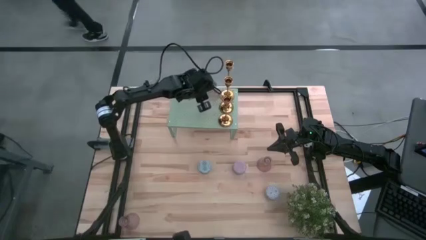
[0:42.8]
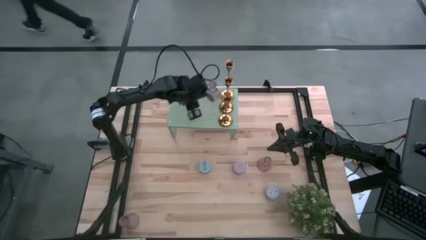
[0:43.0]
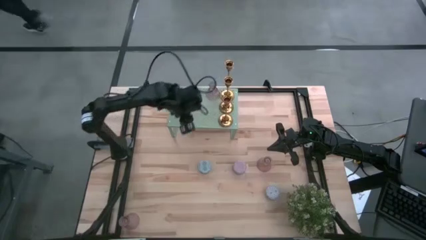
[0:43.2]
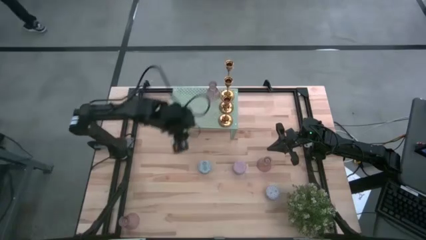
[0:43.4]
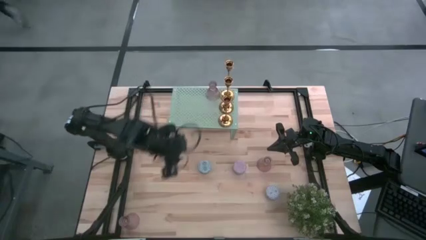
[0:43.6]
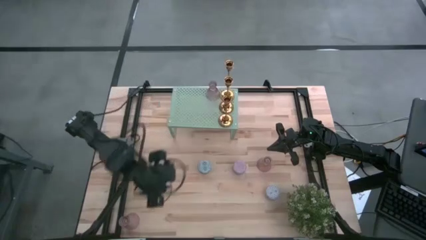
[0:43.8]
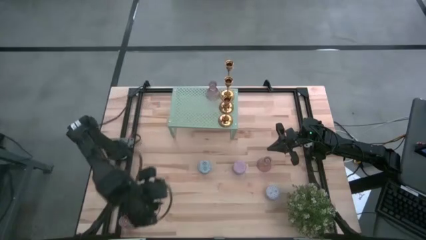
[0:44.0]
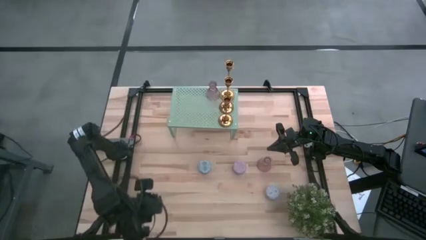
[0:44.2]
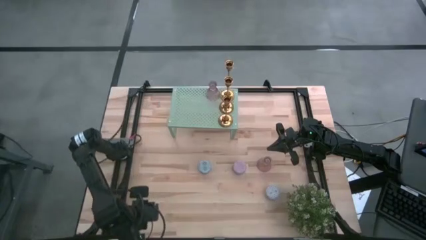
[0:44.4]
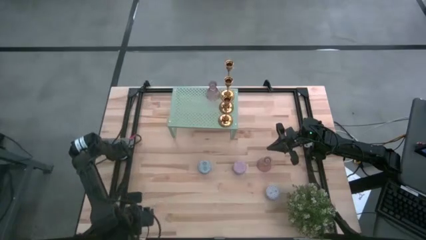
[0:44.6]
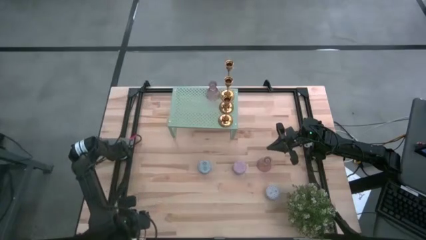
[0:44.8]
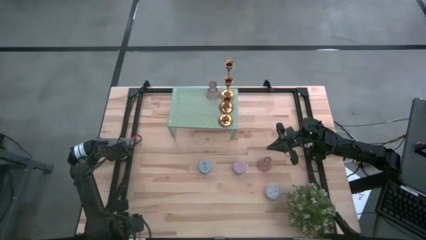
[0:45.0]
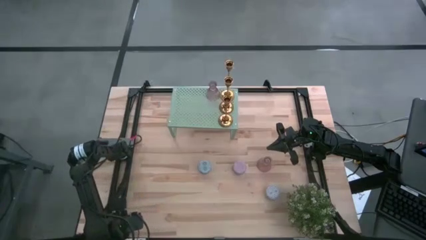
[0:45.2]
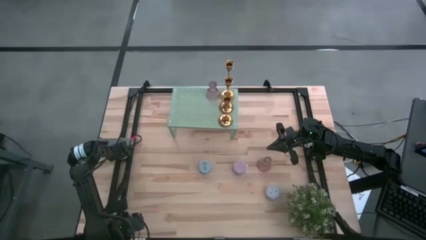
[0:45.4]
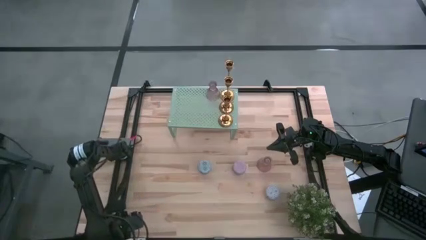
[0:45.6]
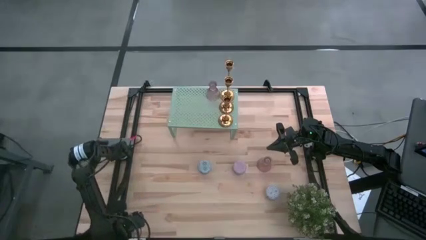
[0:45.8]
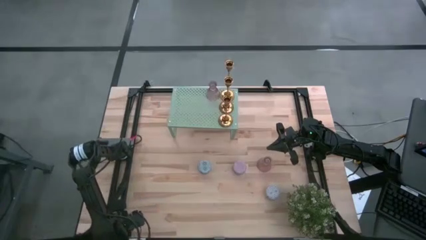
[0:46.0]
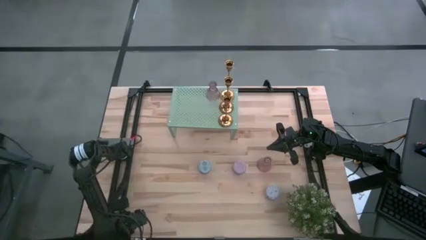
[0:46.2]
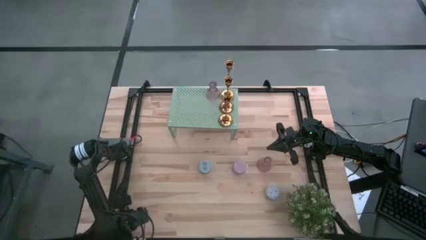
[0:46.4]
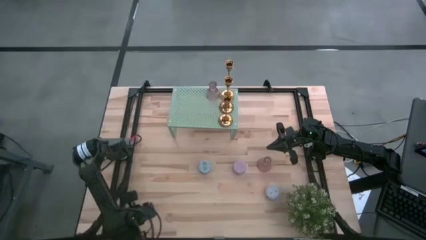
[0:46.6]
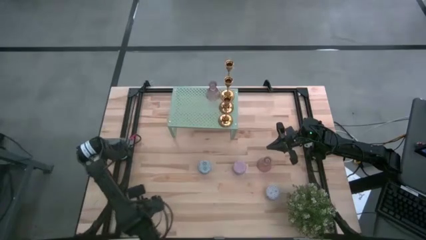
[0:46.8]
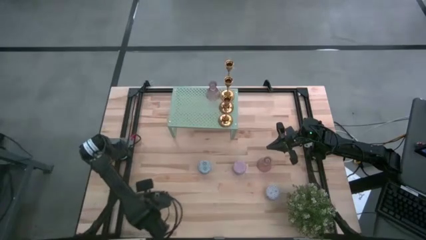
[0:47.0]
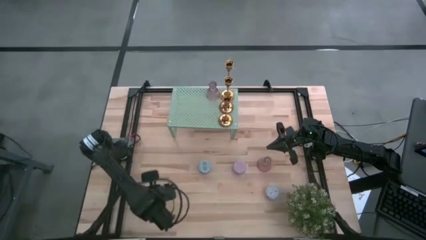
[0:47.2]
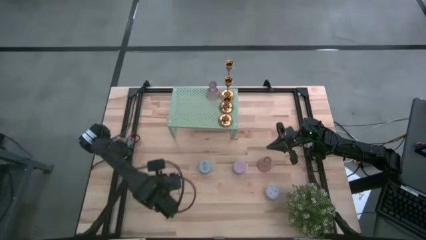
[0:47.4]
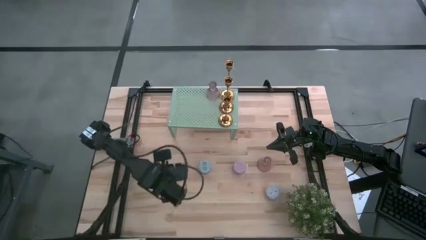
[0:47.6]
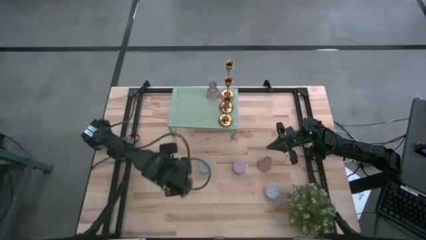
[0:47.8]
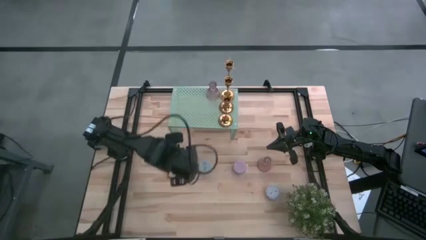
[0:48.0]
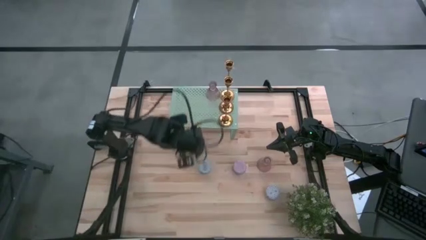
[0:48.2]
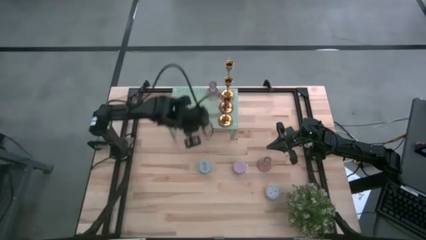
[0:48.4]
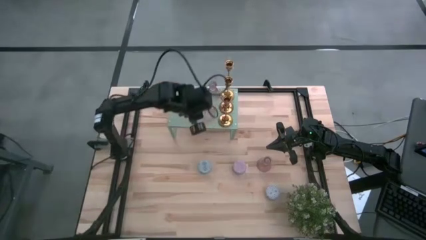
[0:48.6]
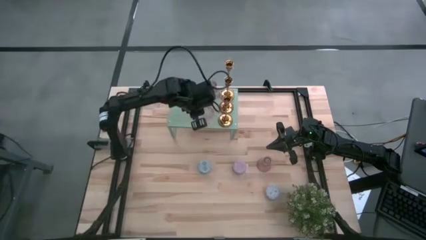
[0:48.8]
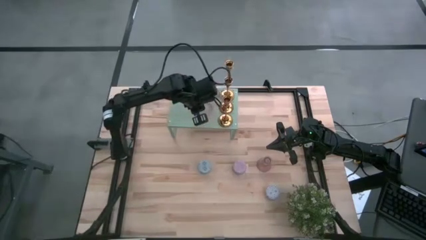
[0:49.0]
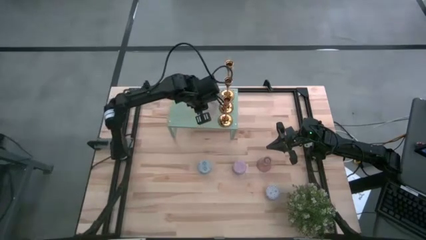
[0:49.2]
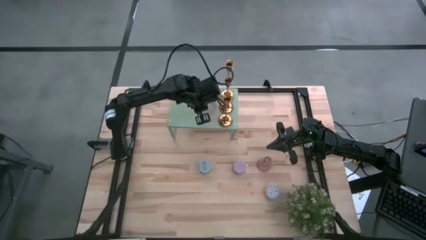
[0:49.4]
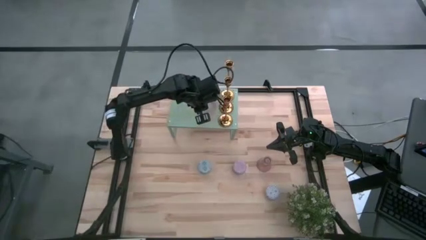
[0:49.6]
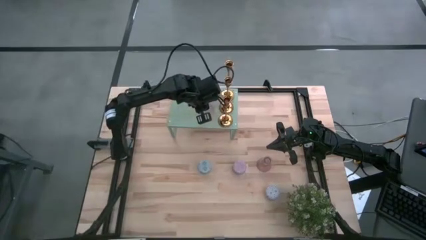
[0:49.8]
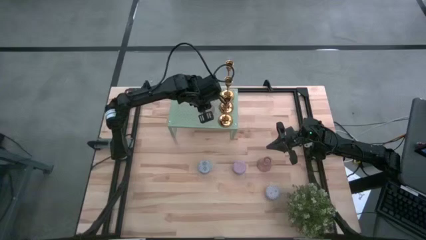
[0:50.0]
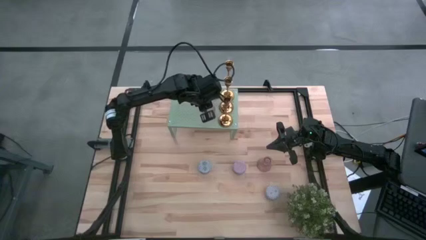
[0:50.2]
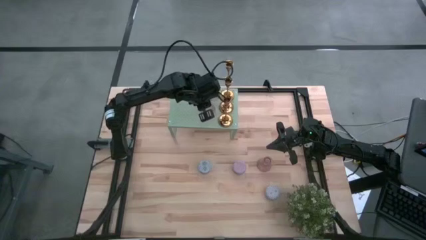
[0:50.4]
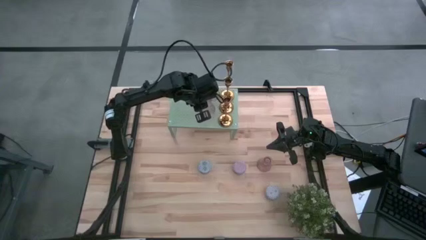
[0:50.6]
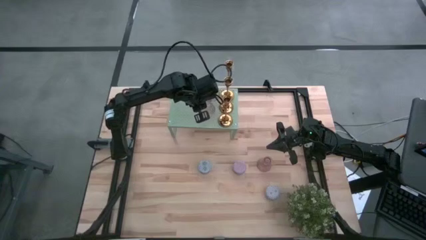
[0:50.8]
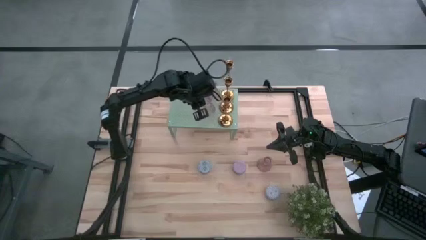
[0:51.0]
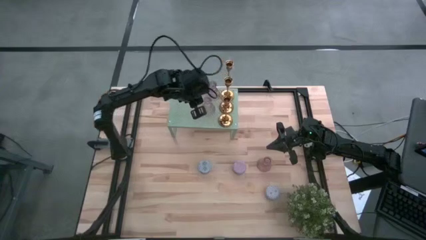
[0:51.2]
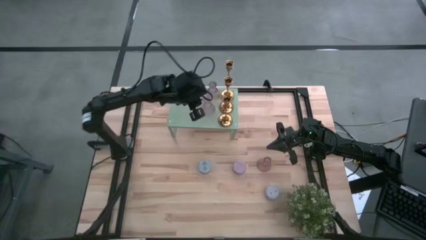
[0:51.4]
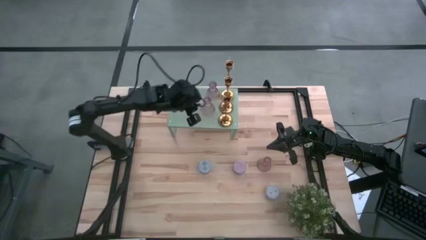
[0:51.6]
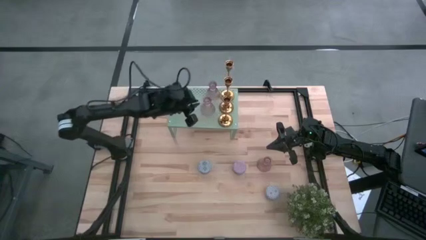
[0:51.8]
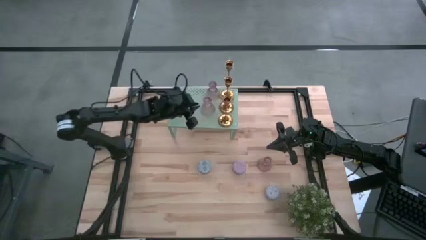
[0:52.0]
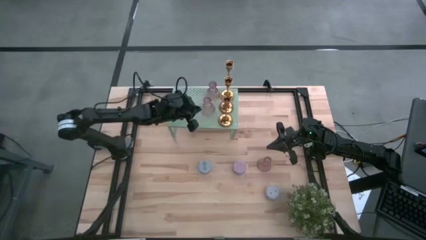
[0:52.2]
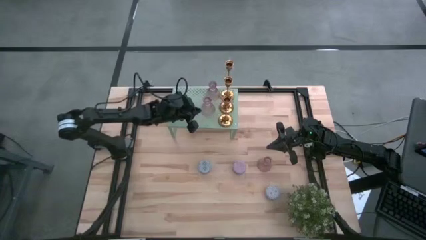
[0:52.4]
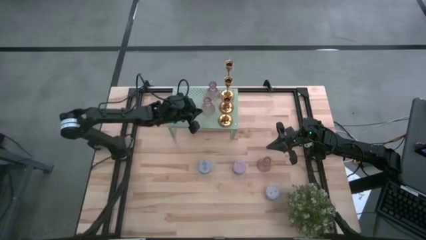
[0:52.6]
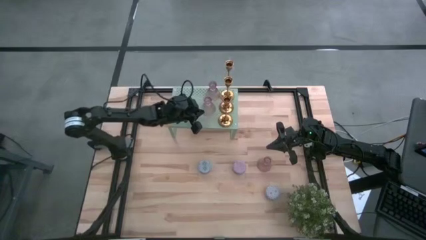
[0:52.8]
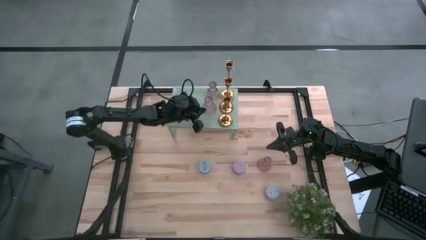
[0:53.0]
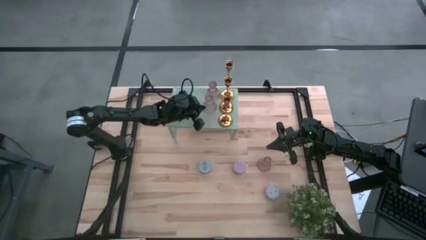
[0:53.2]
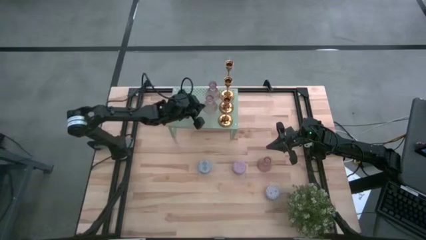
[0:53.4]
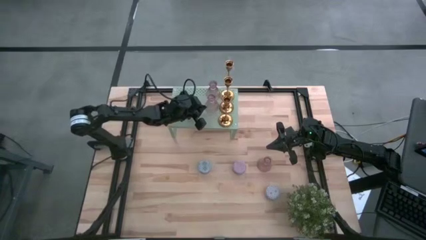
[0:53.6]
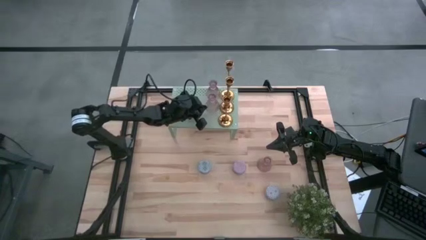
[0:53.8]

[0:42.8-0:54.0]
Task: Pick & Place candle stick holders
Put the bottom purple candle holder on the shelf aligned with the purple candle holder

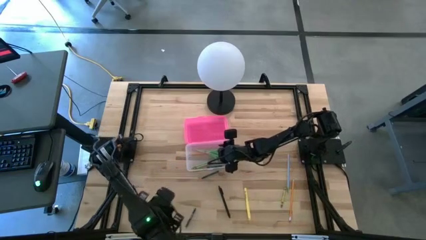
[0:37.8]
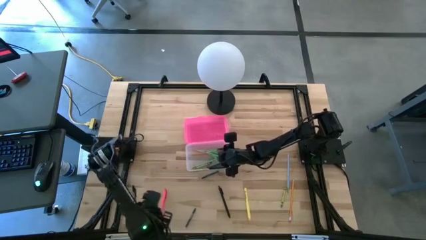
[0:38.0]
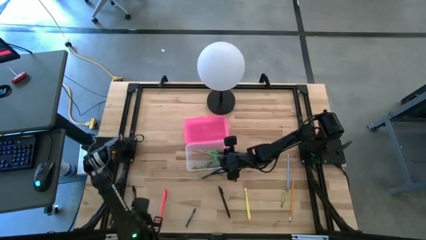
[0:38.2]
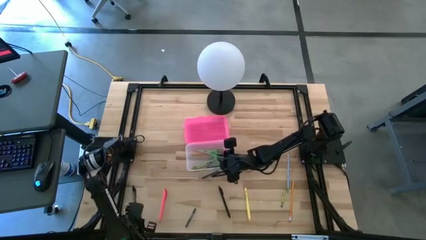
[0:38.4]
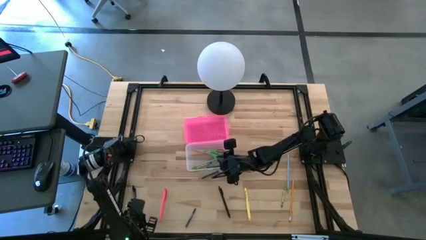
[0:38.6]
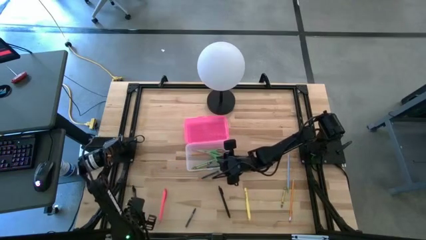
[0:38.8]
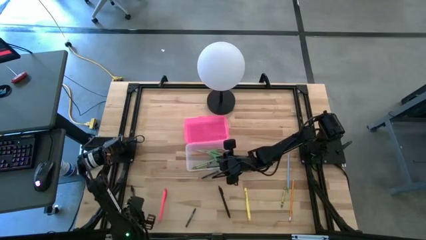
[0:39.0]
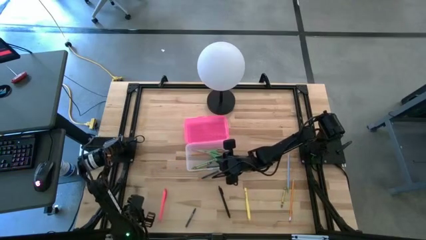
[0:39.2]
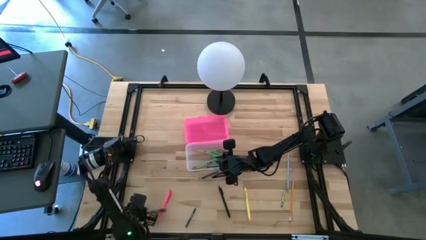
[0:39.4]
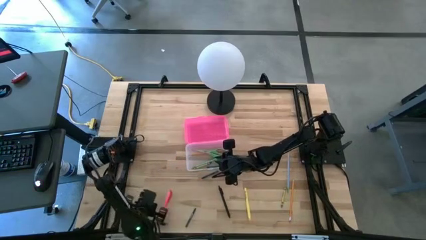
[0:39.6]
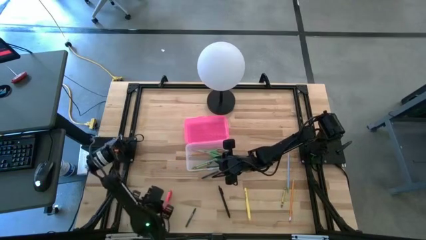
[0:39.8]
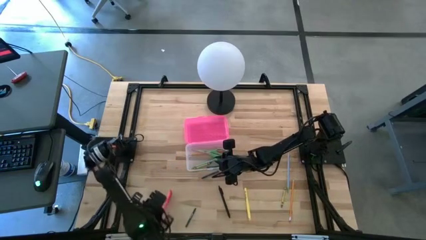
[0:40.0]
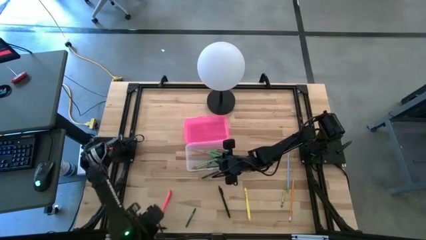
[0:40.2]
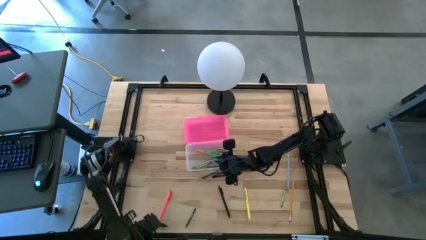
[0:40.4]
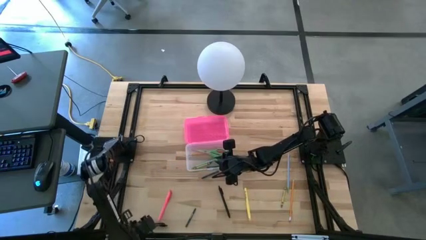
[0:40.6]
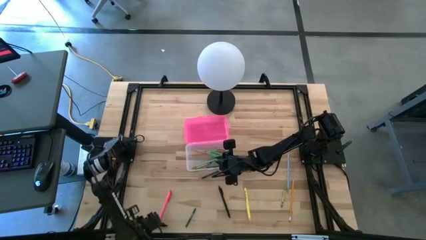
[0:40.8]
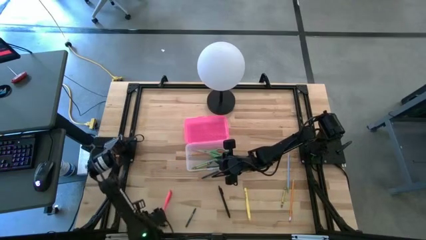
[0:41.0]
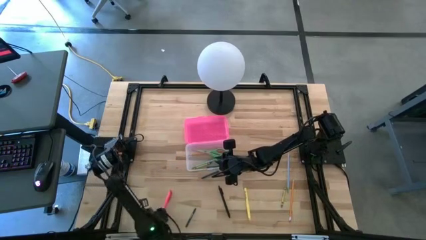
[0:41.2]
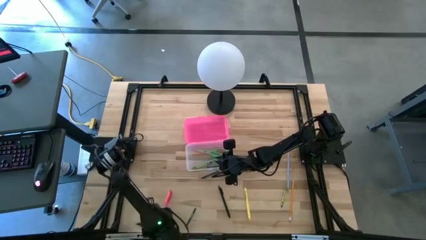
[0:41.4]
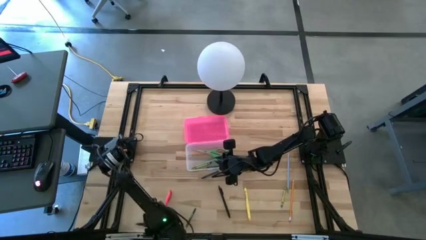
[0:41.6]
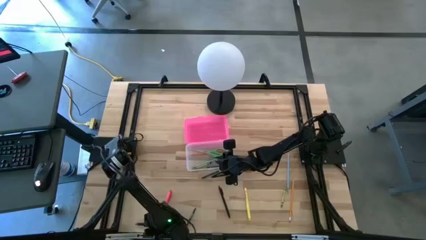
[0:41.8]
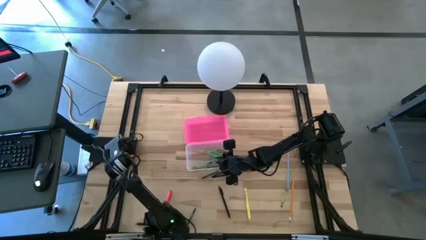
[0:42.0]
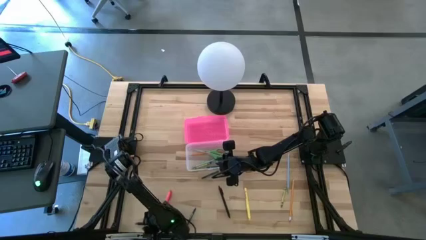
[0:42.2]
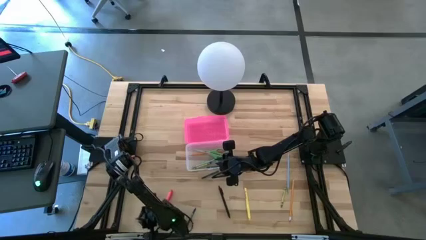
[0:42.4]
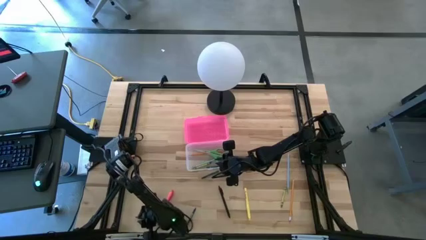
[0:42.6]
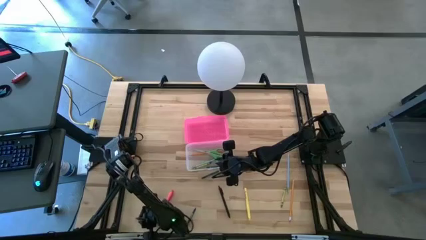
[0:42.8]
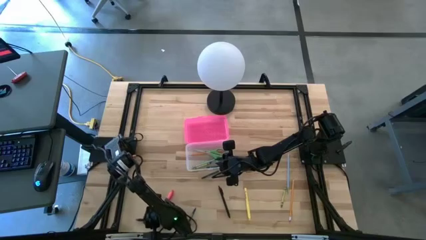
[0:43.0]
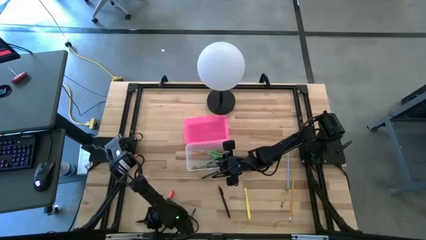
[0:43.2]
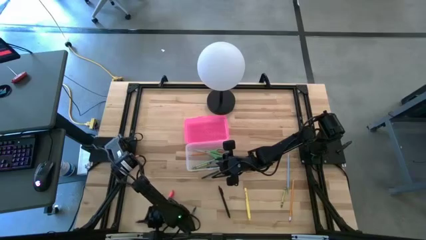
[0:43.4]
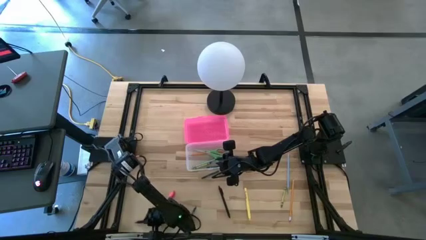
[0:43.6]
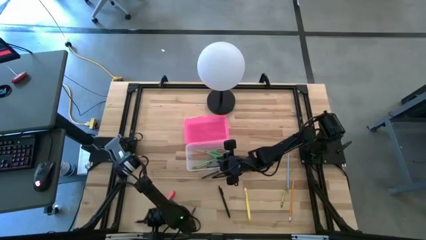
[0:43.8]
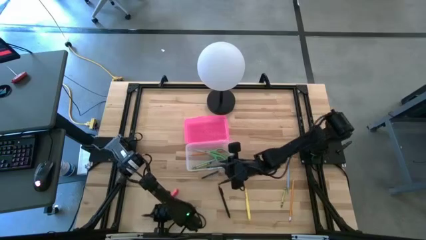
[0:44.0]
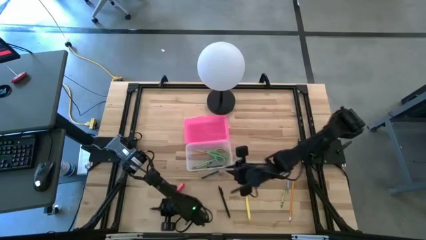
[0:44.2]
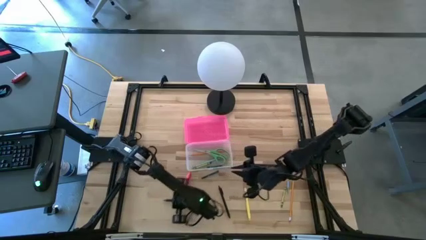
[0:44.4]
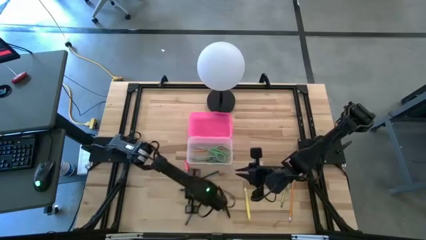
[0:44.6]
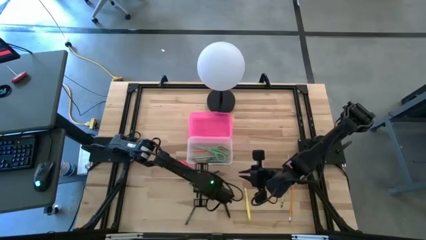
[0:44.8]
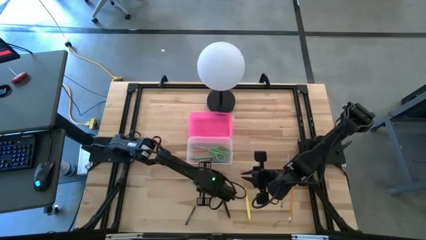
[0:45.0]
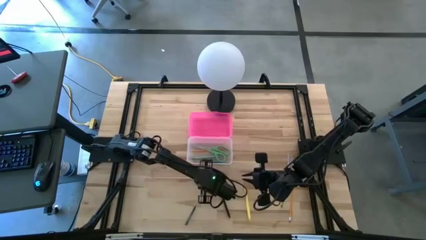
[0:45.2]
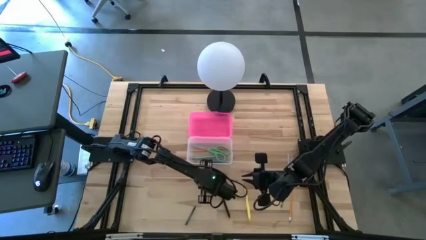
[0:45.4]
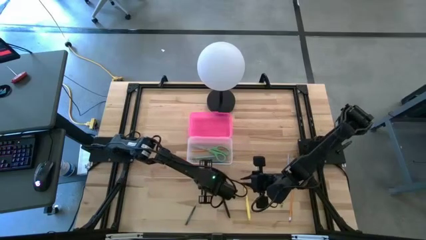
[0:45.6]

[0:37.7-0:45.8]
Task: Pick & place school supplies into a supply box
Put the left black pen into the pink supply box
